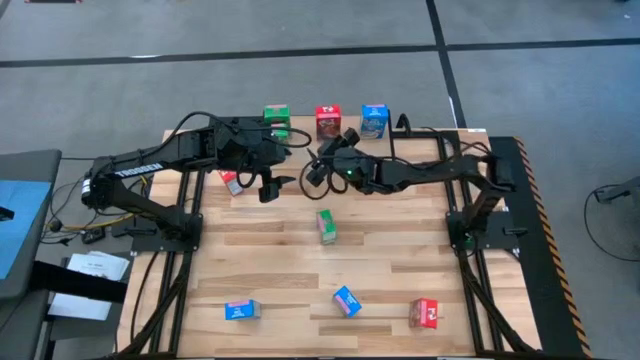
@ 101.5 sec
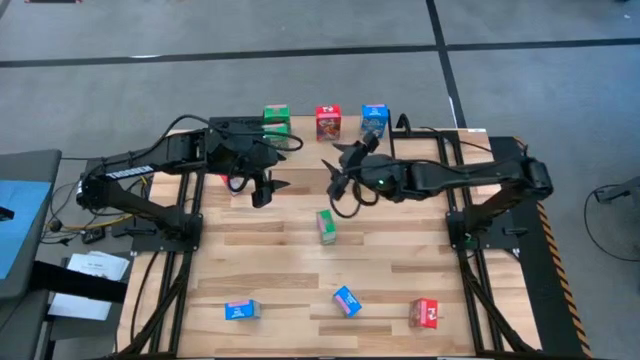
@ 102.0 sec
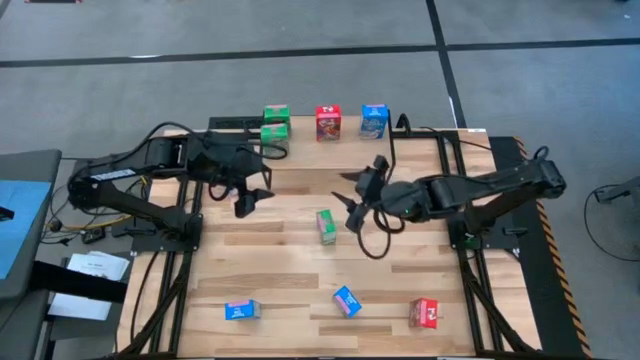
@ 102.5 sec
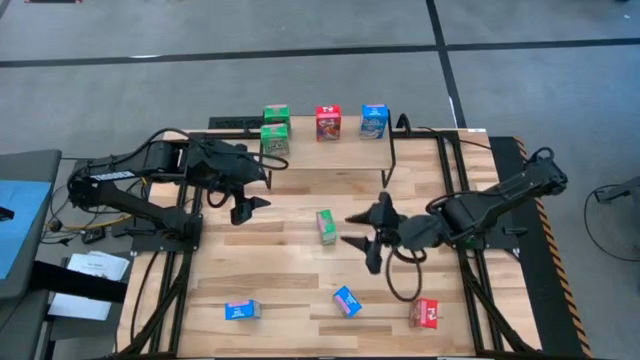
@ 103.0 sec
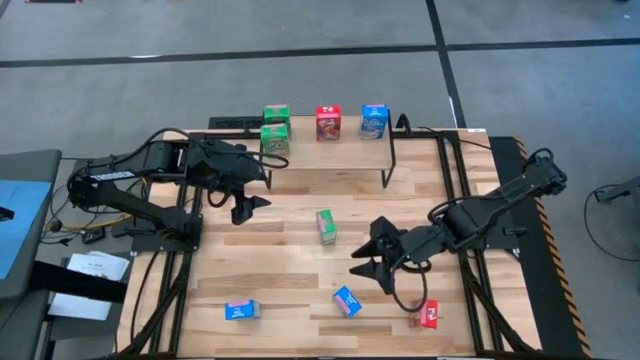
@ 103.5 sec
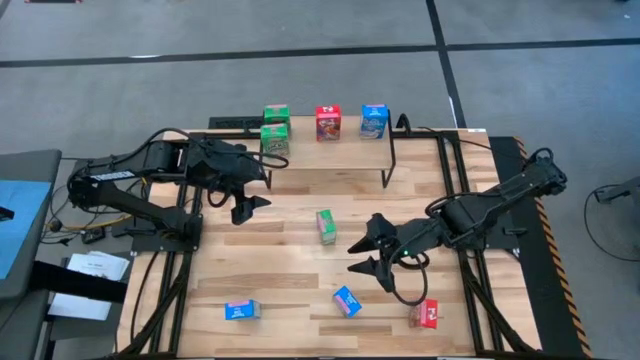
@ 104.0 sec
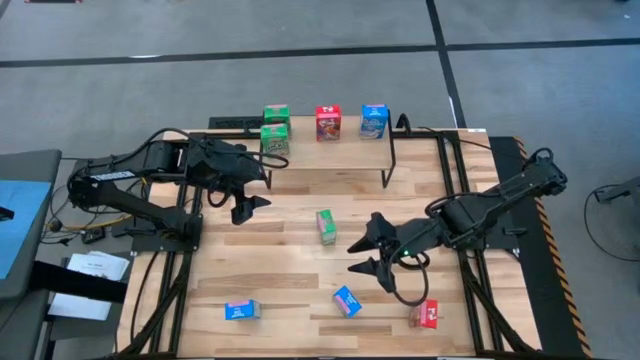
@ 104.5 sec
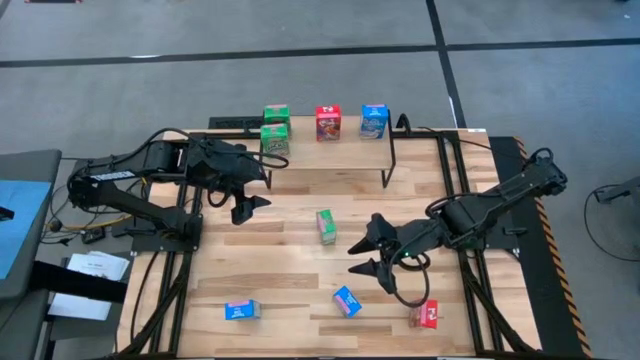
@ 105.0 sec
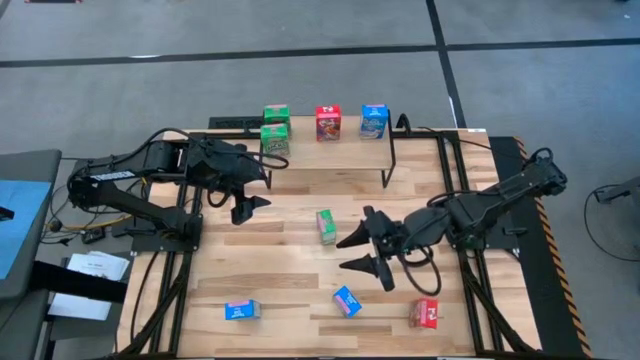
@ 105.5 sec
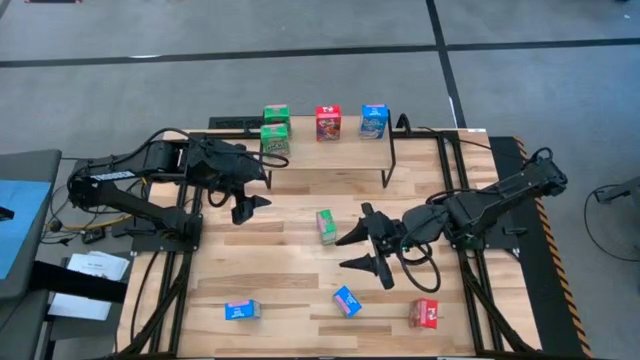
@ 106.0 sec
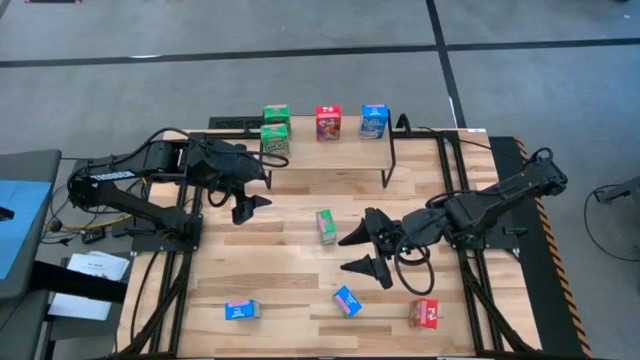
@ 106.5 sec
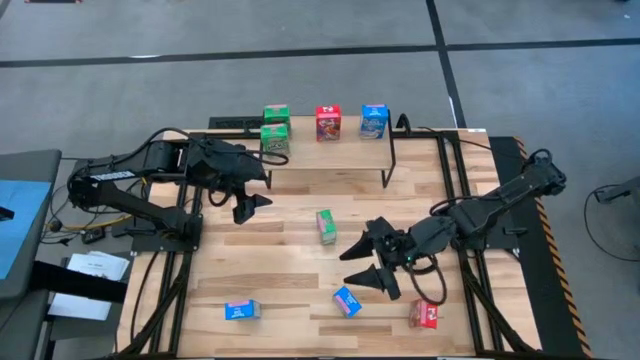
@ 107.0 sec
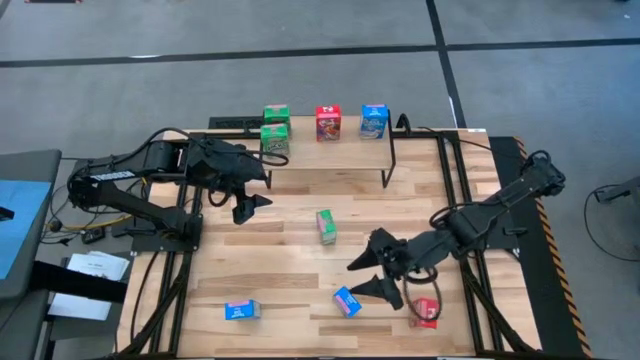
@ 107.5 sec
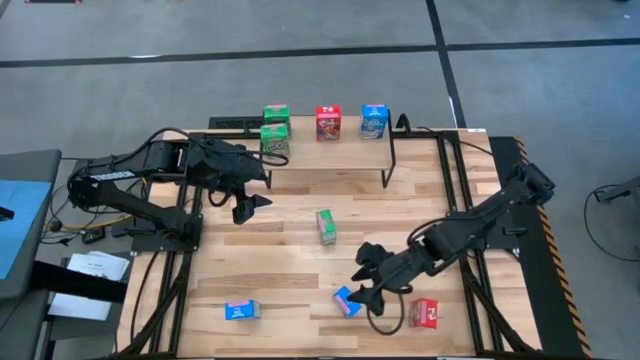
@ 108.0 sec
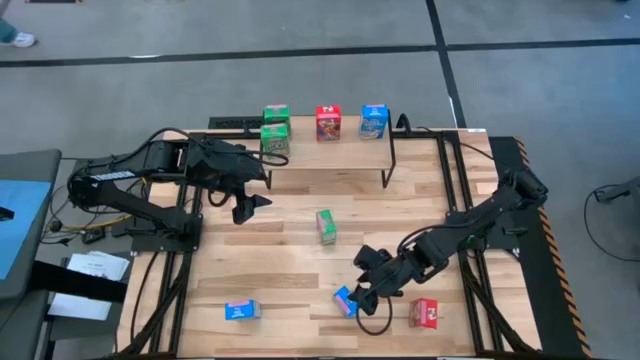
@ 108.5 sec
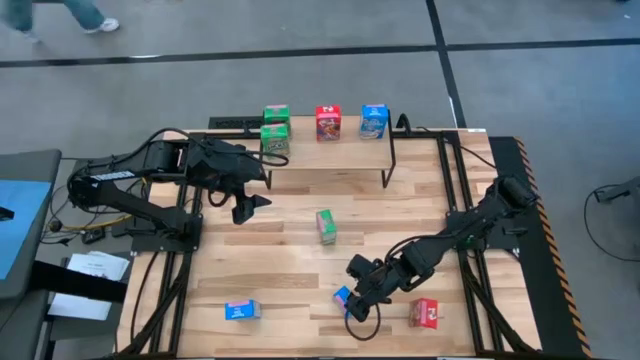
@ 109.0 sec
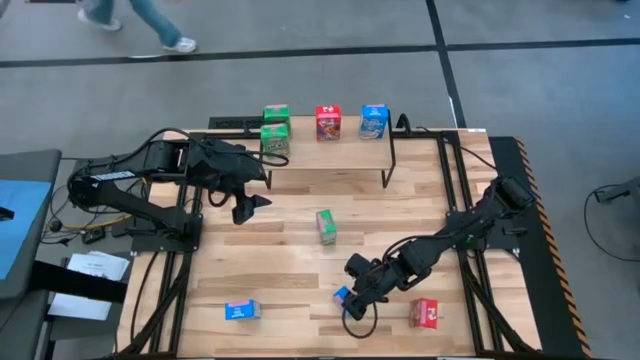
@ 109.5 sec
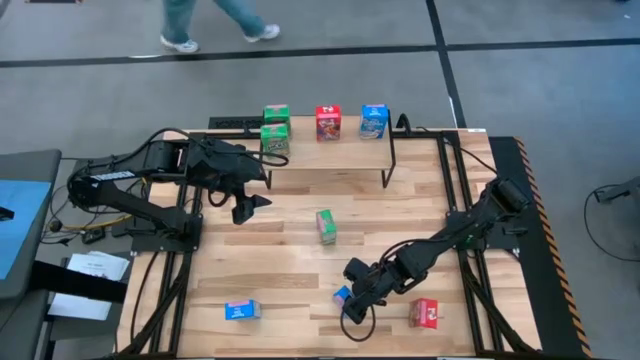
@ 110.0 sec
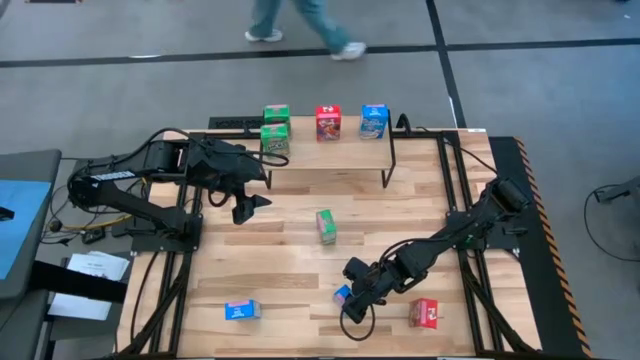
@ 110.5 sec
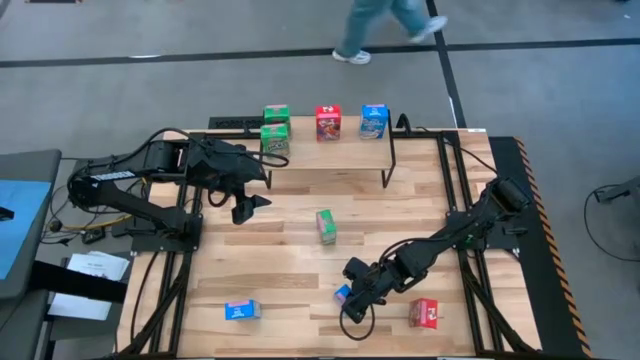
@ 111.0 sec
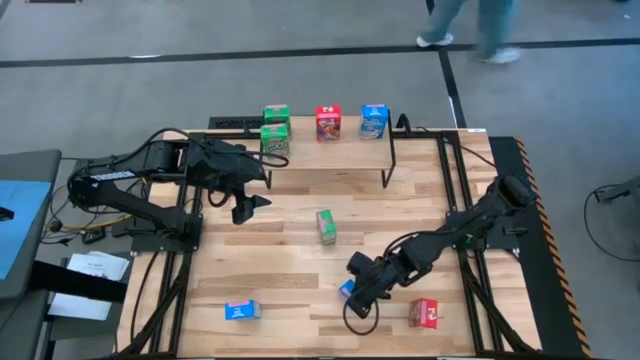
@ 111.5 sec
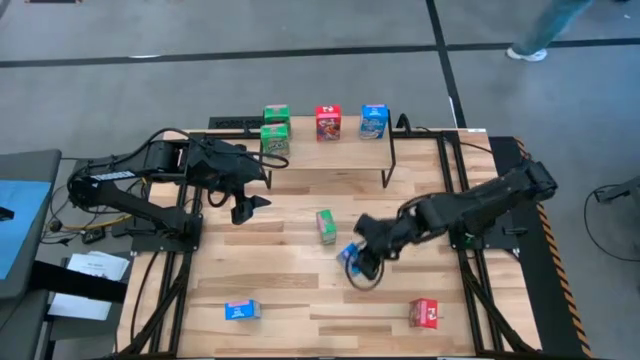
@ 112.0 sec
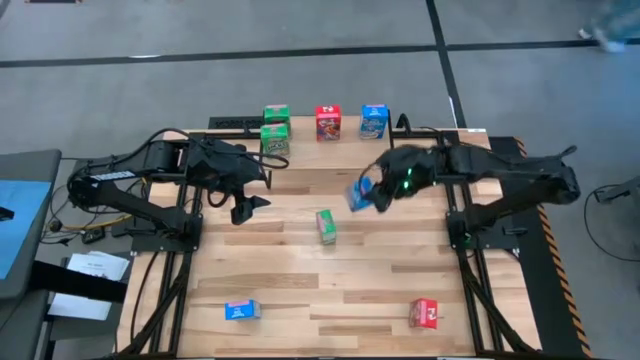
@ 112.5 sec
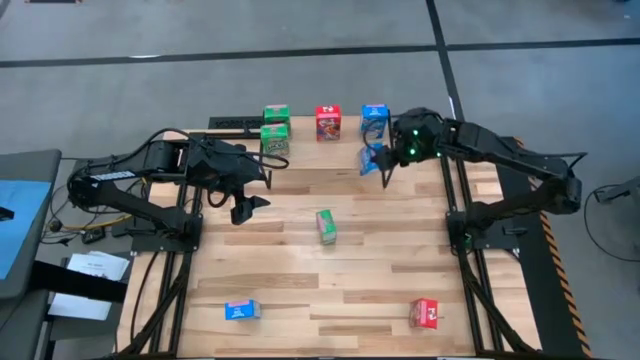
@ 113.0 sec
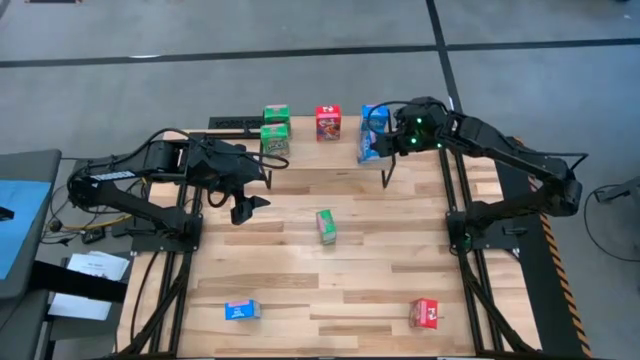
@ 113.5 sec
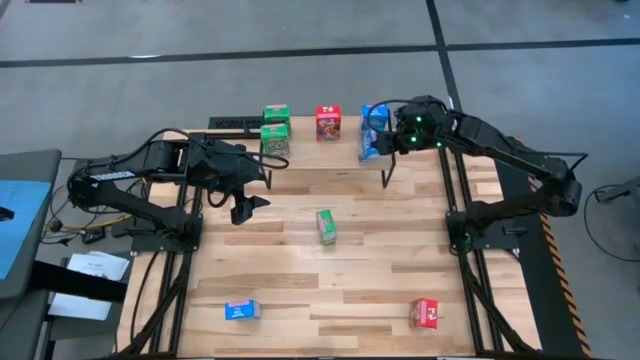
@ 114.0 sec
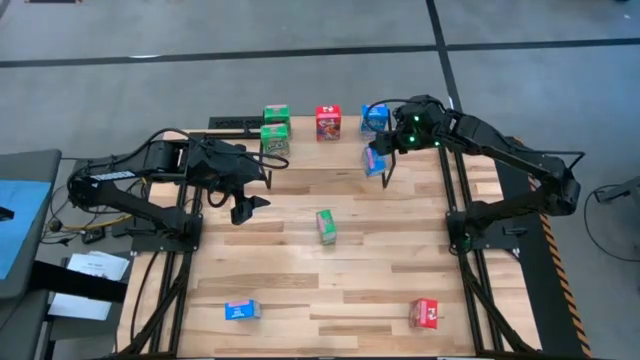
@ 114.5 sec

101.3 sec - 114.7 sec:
Task: Stack cereal on shelf
Put the right blue cereal box on the shelf aligned with the other blue cereal box

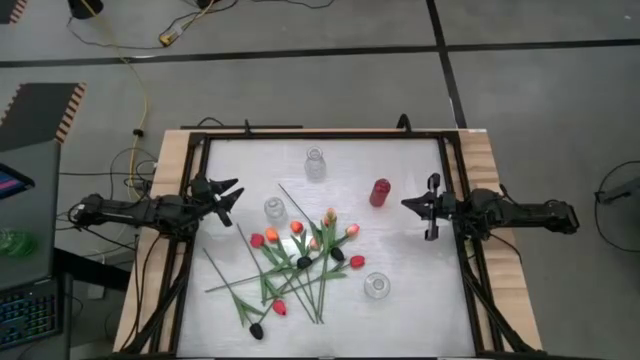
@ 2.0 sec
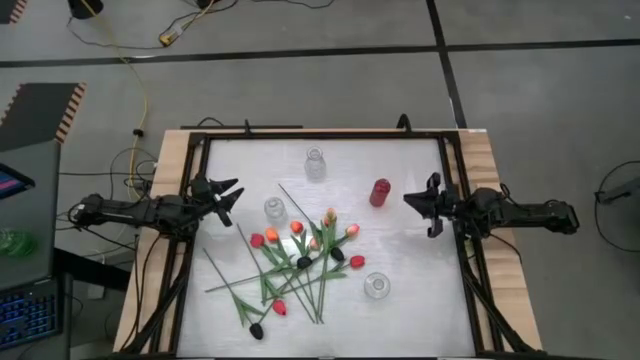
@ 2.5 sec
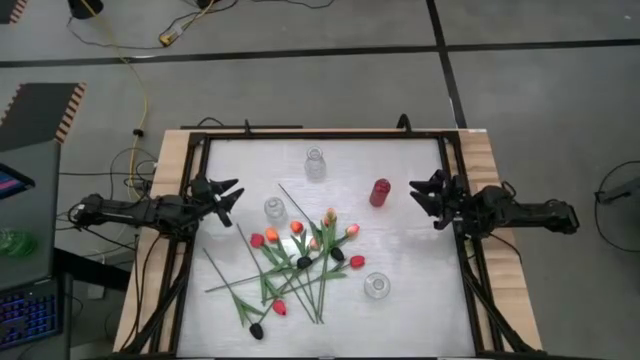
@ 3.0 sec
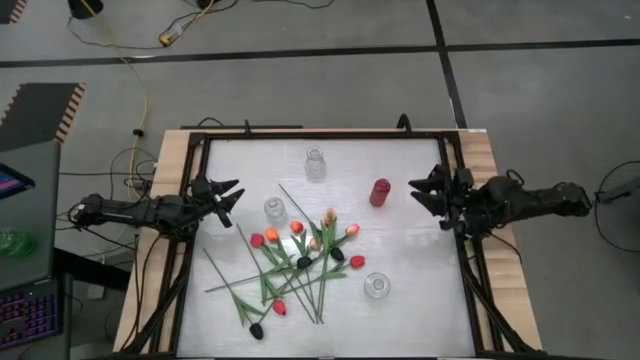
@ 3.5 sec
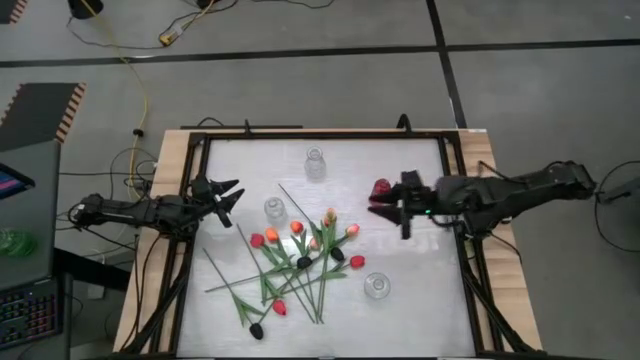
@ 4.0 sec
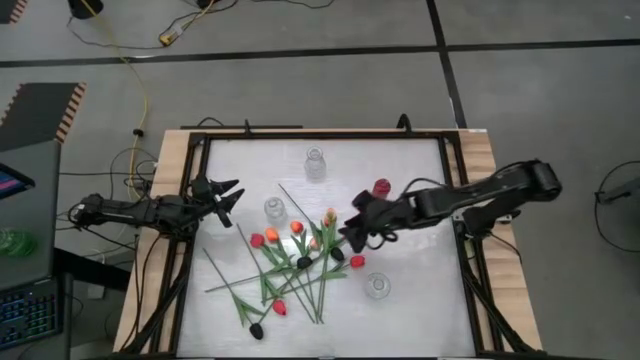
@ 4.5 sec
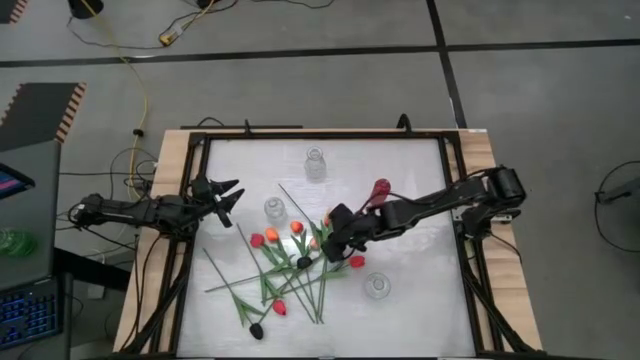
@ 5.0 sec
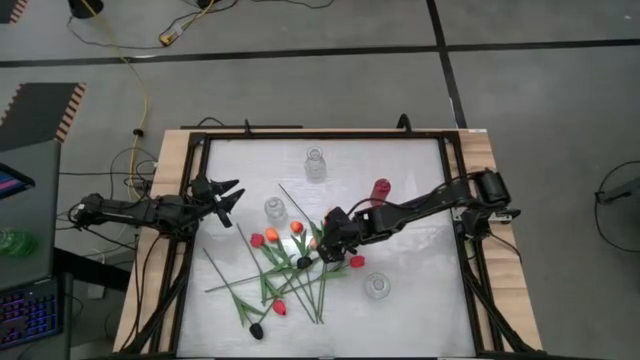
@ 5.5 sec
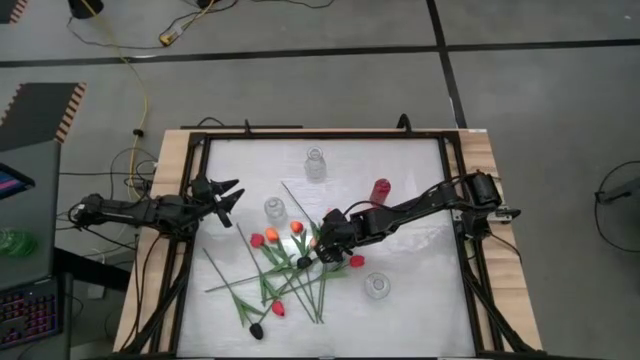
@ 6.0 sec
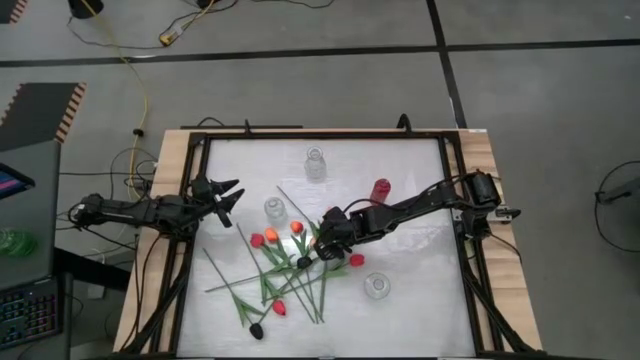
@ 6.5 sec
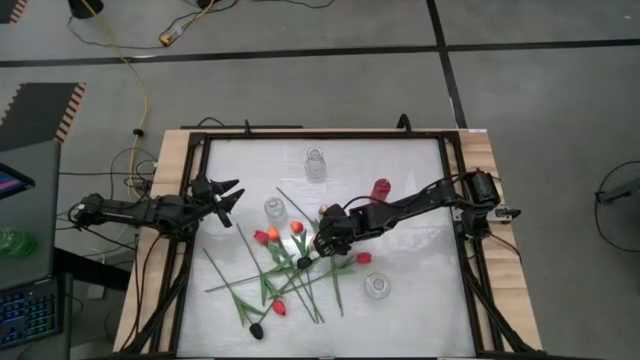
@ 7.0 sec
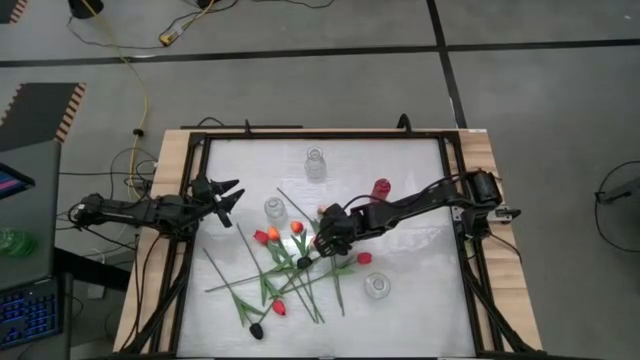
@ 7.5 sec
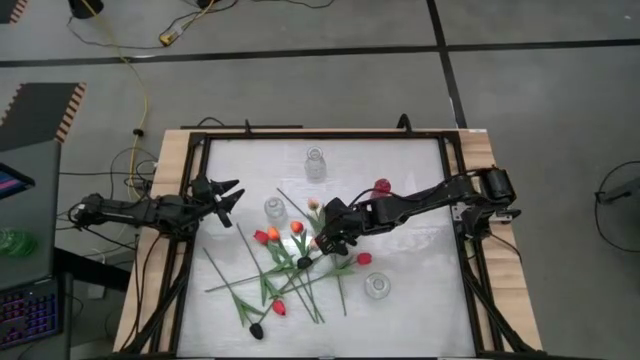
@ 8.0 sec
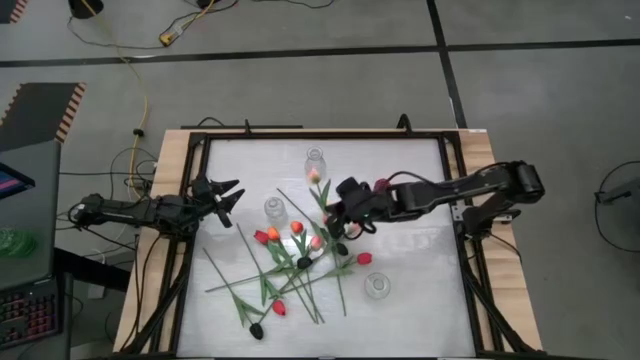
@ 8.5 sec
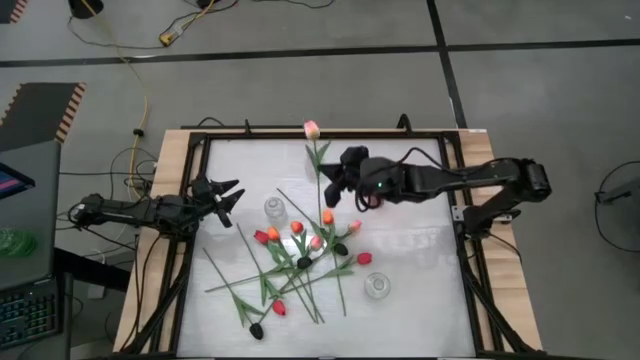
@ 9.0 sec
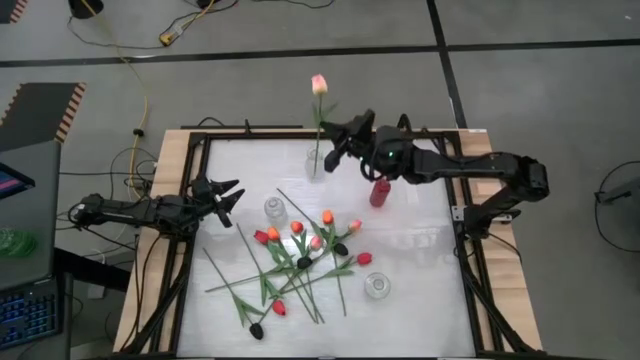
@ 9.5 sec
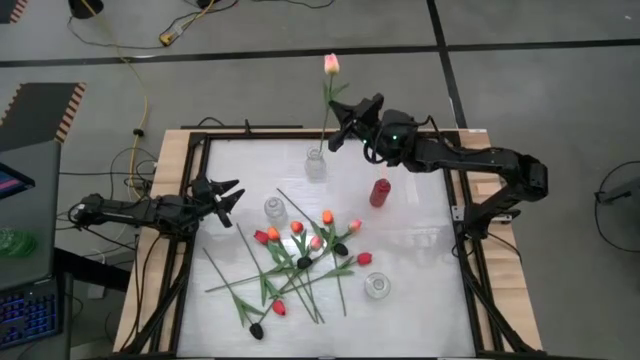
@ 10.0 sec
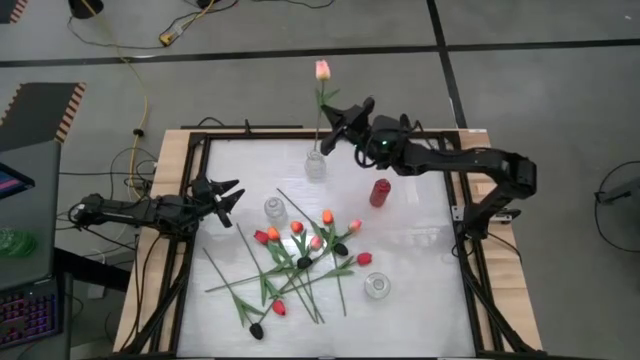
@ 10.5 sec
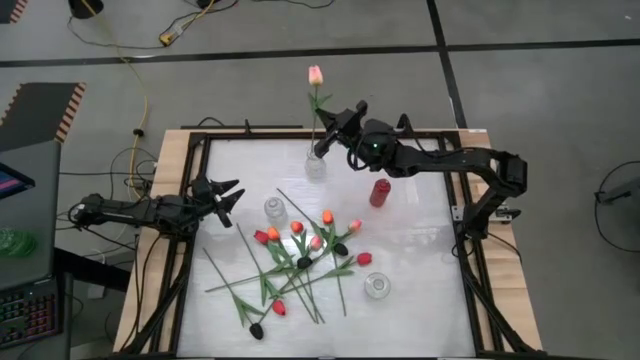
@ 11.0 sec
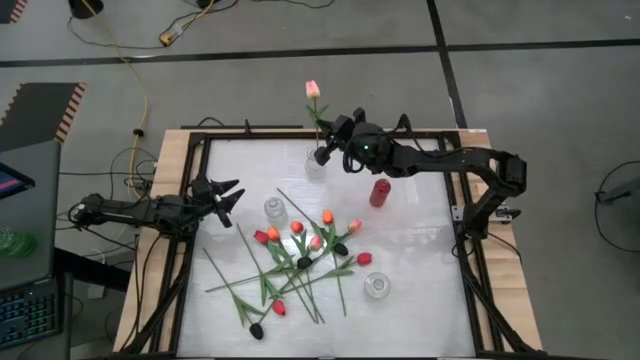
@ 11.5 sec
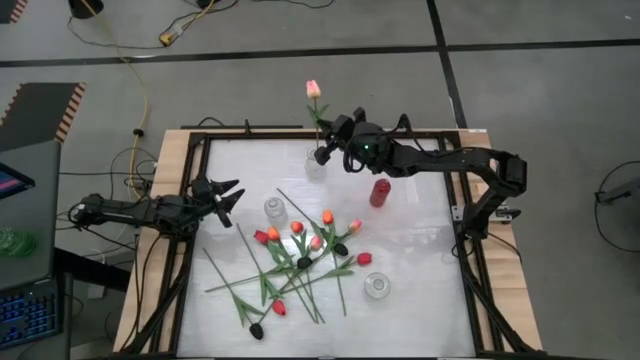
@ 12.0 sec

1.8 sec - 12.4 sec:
Task: Sort flowers into vase by color
Put the pink tulip into the top transparent vase
